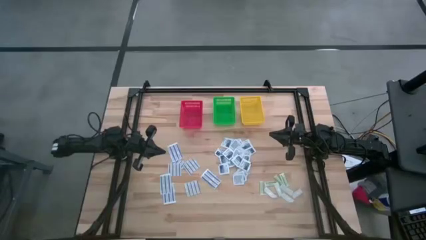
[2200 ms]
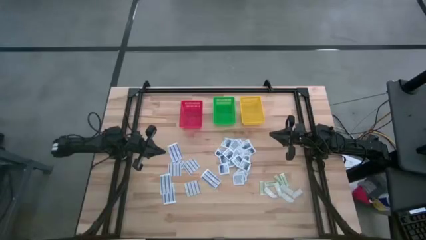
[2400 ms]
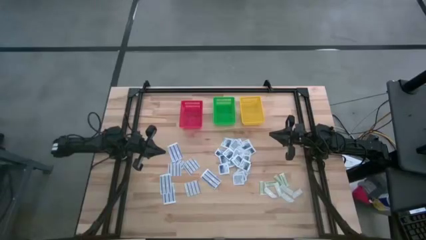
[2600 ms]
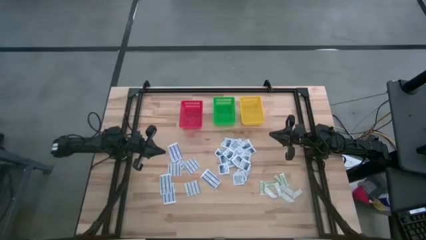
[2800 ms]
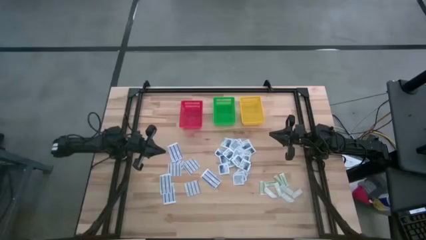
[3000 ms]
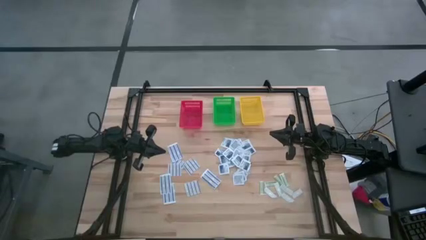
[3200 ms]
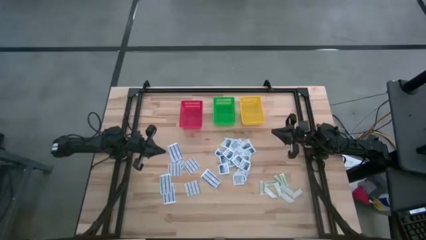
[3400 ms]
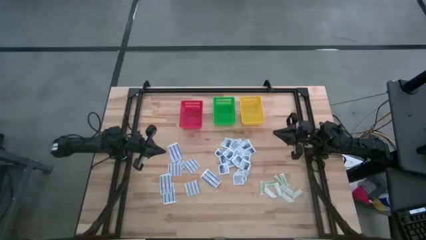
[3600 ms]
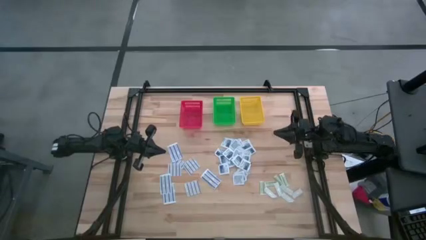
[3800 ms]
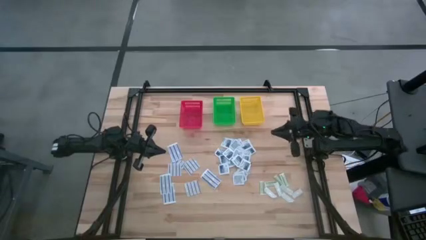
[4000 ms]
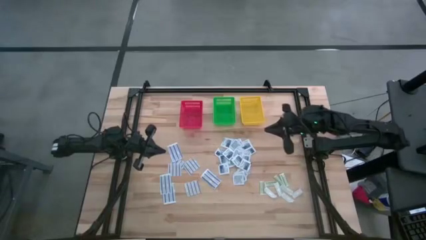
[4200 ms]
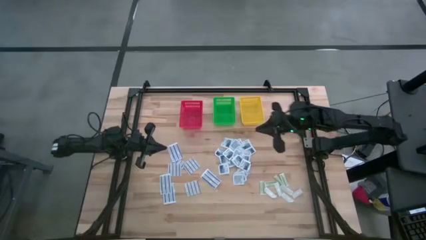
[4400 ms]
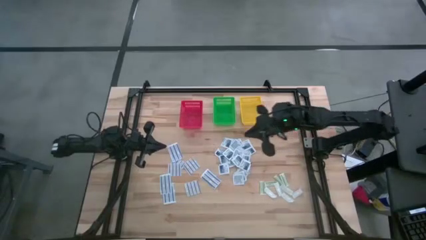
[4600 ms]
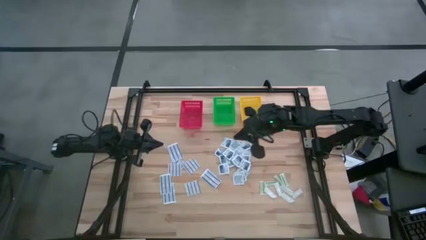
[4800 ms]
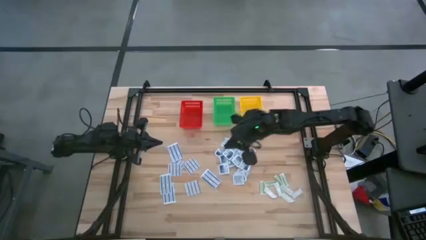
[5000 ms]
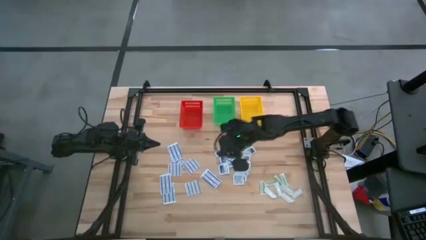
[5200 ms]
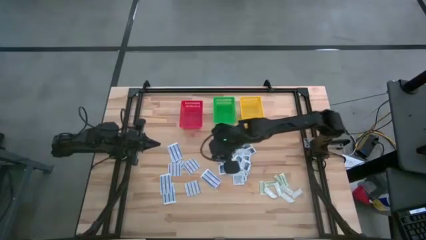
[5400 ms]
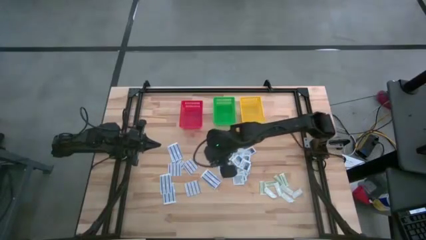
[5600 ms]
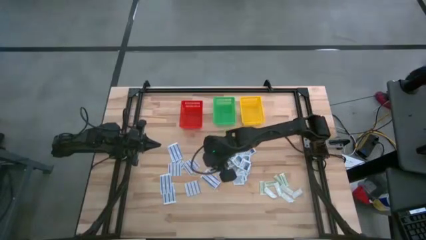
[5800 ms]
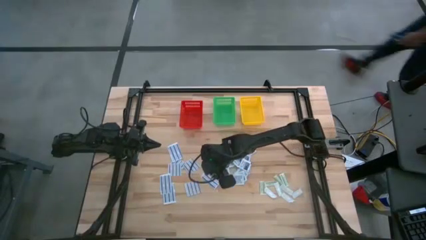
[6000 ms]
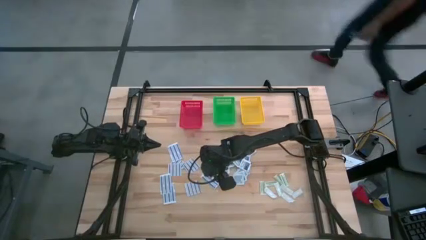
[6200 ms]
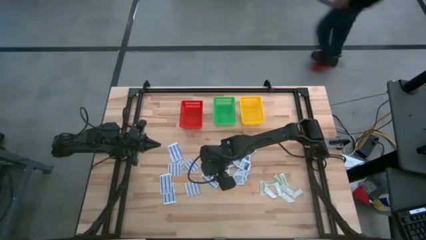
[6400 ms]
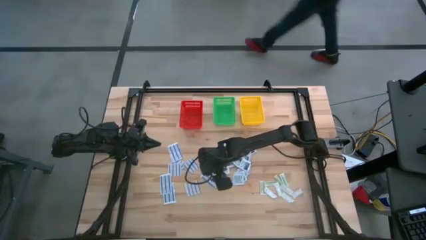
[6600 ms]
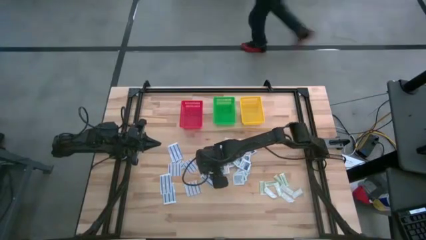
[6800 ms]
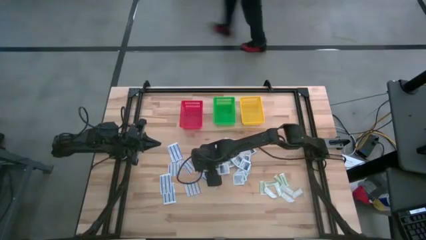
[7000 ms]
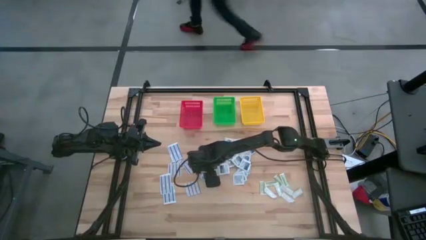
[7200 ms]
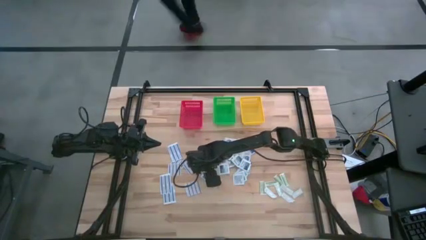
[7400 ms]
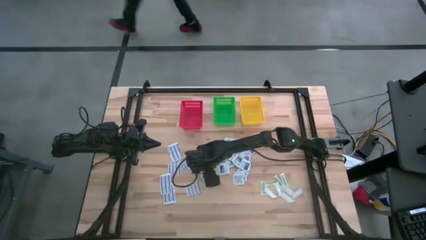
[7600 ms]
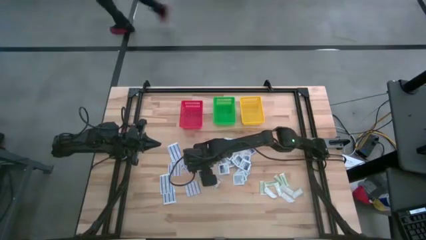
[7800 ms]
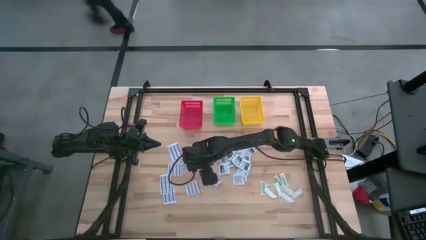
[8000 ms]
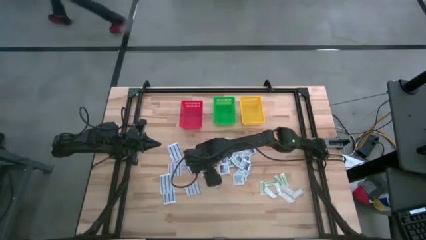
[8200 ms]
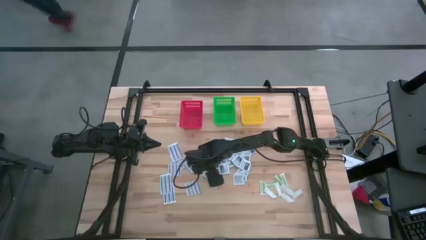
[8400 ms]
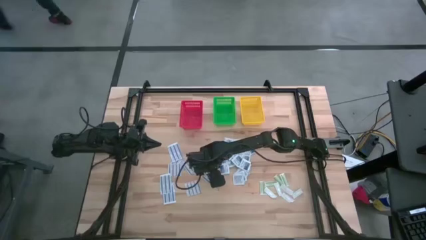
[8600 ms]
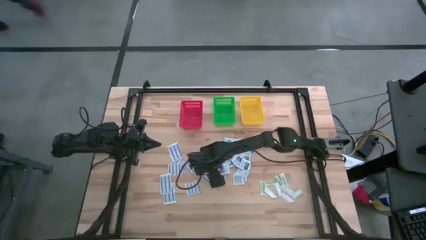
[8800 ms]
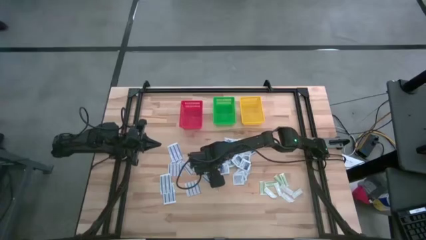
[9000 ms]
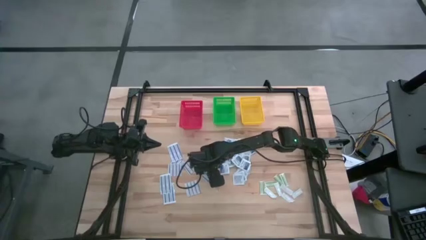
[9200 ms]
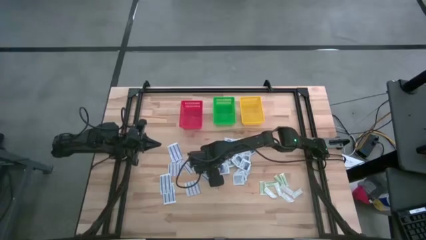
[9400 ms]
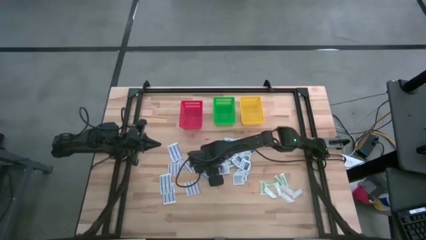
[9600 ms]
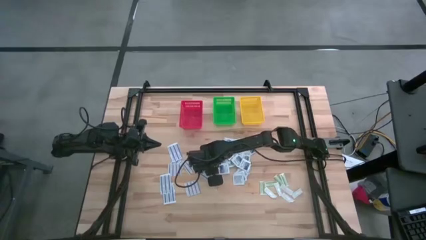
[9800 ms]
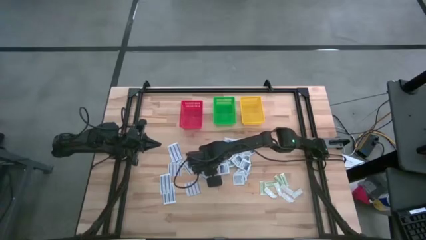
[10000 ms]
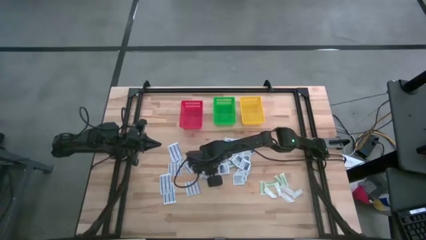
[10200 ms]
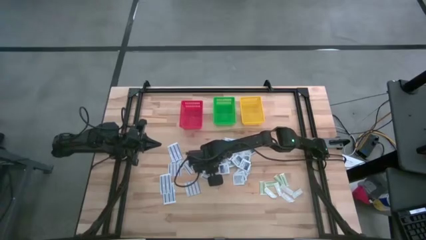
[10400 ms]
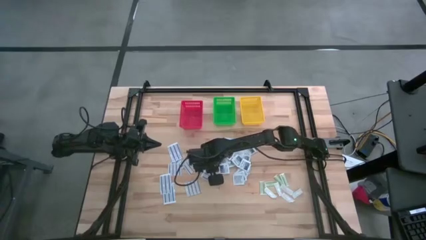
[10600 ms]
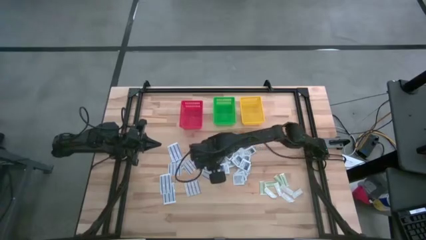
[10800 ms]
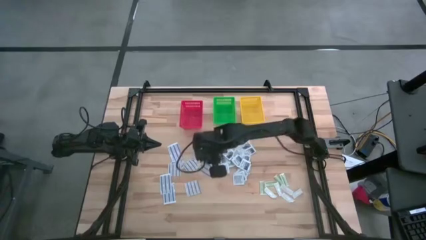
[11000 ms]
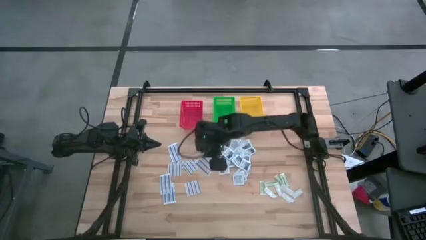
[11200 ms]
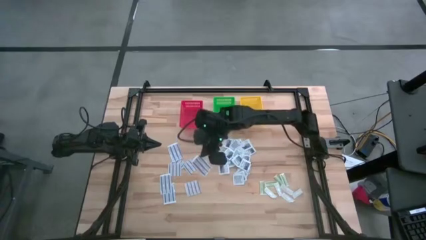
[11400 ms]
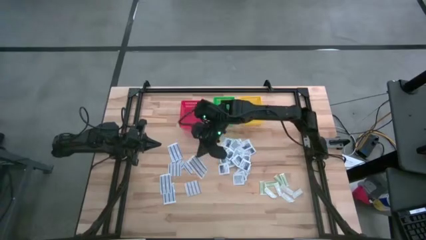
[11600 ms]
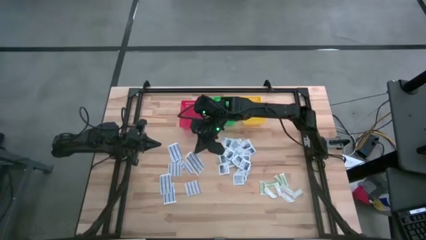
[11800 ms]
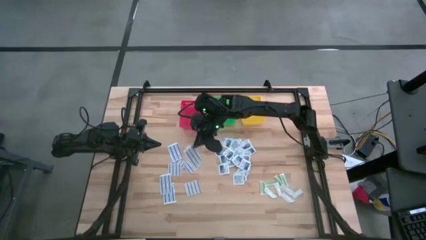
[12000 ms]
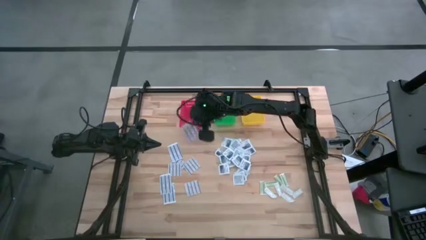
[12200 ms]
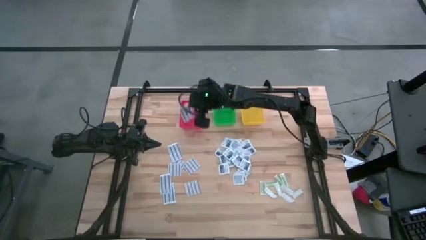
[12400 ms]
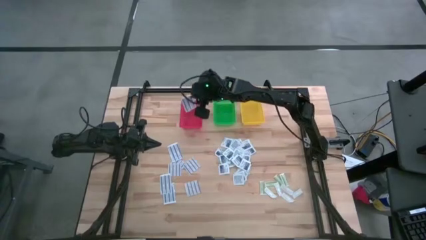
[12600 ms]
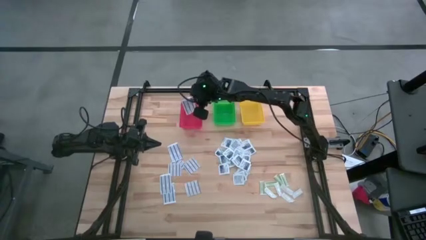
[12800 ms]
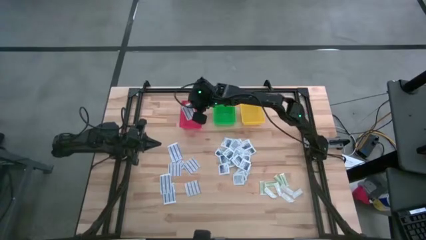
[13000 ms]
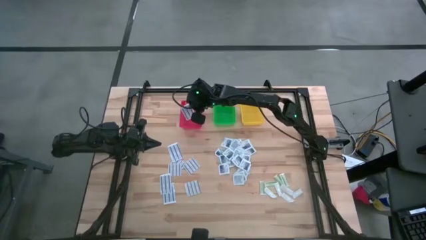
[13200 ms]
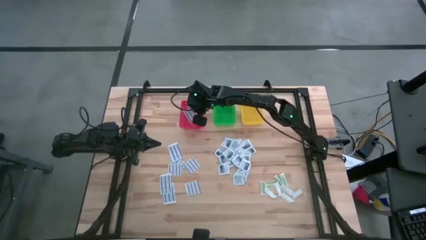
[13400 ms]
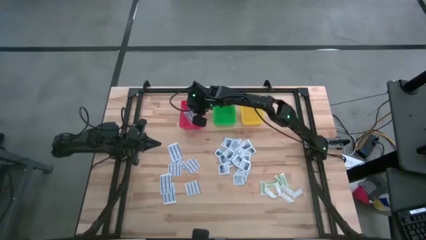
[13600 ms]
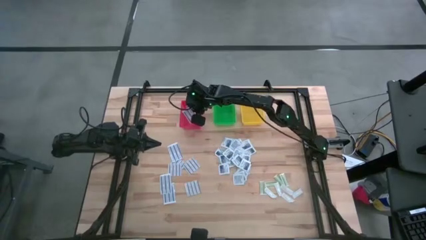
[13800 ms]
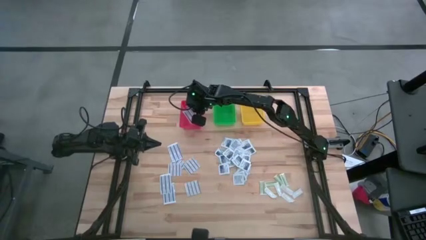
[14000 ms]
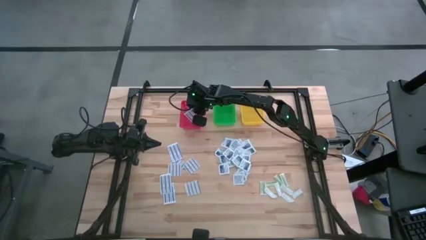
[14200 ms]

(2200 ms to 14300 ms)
Task: Pick & Place First Aid Supplies
Put the blue bandage into the red basket
